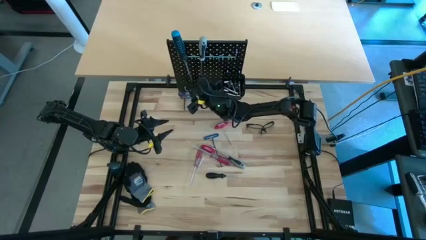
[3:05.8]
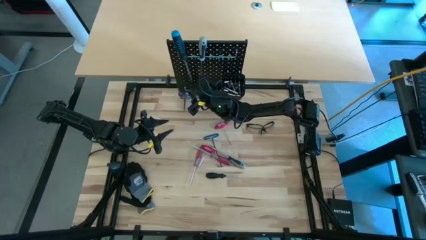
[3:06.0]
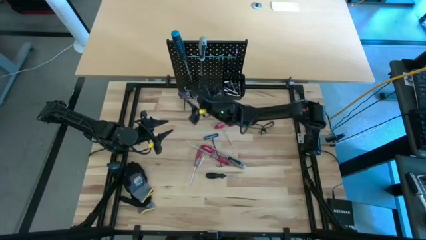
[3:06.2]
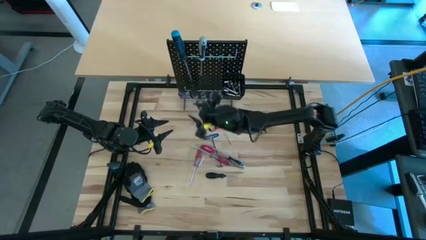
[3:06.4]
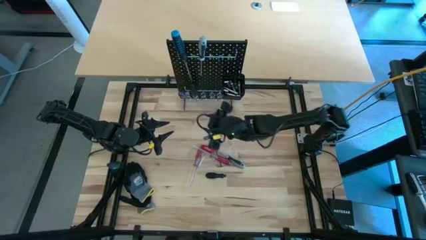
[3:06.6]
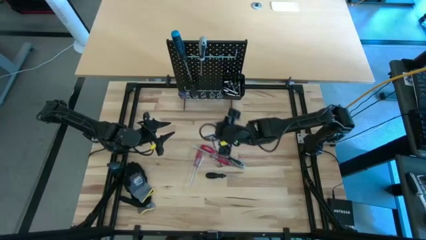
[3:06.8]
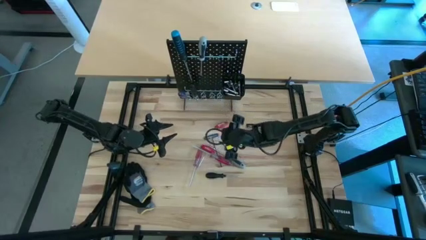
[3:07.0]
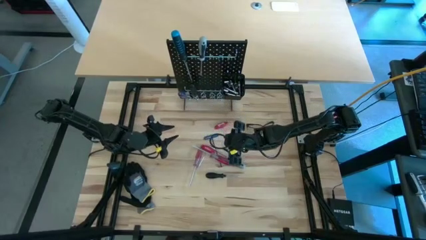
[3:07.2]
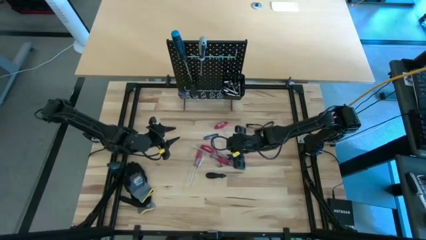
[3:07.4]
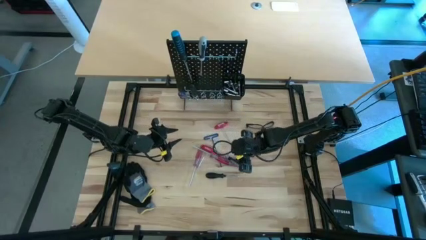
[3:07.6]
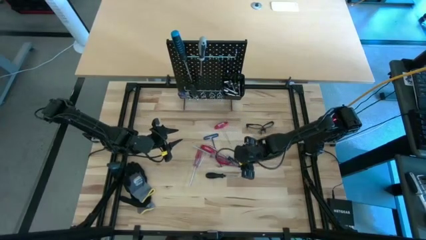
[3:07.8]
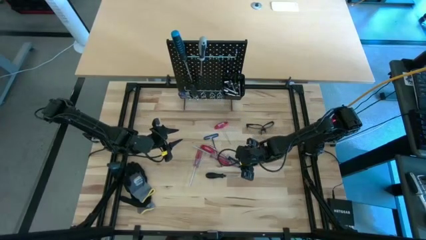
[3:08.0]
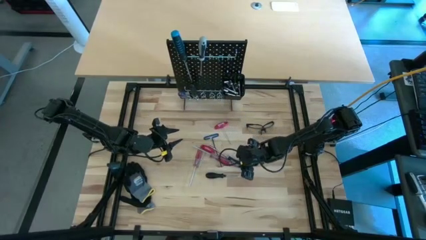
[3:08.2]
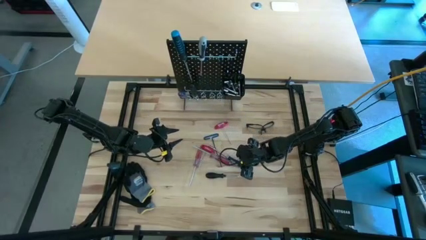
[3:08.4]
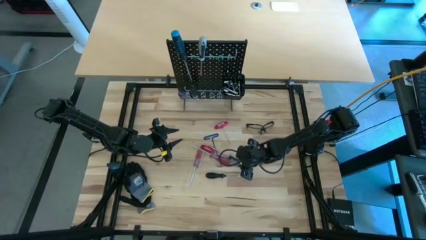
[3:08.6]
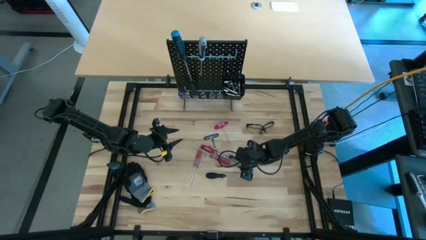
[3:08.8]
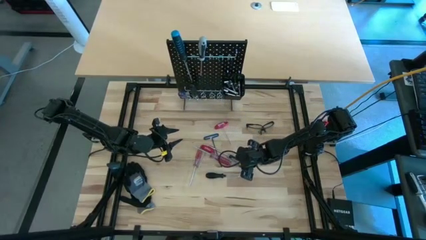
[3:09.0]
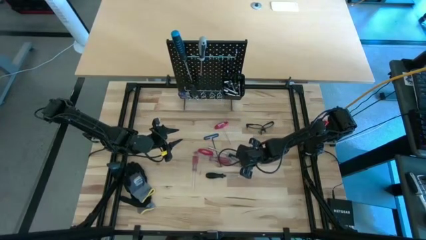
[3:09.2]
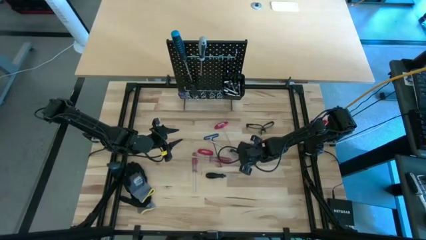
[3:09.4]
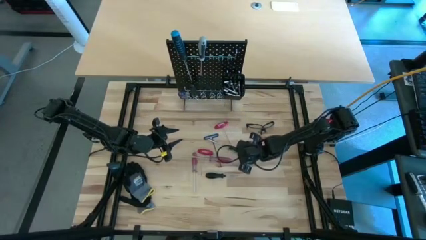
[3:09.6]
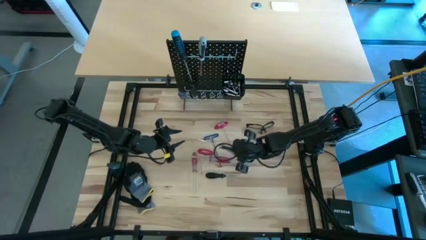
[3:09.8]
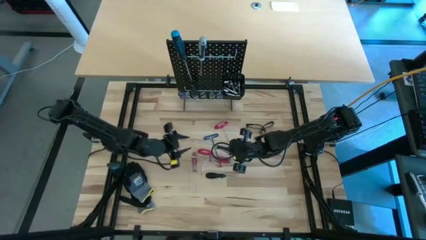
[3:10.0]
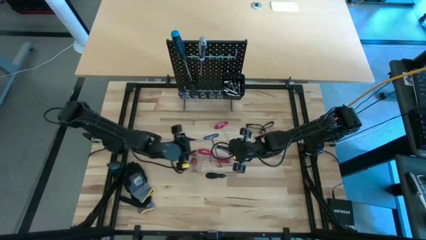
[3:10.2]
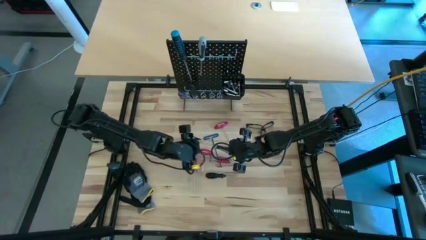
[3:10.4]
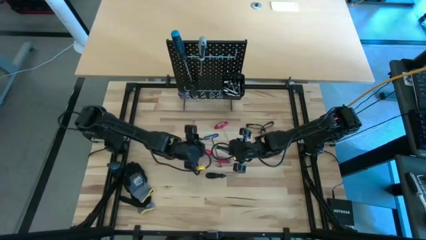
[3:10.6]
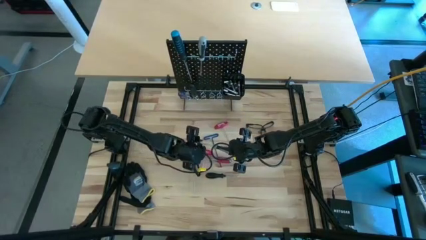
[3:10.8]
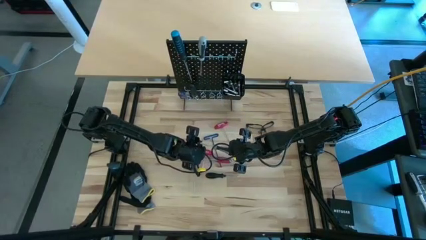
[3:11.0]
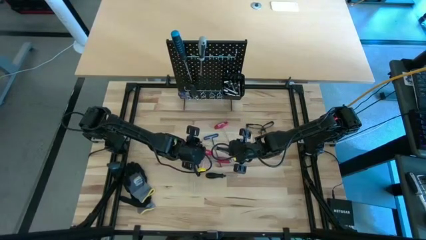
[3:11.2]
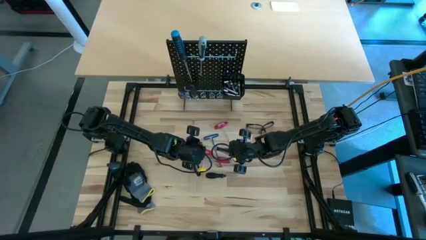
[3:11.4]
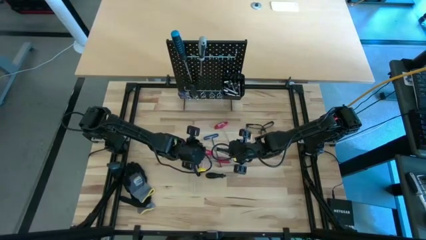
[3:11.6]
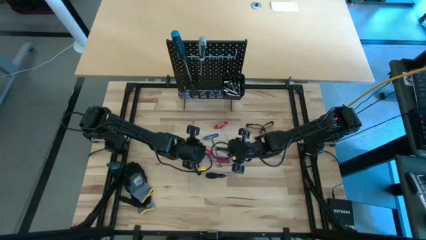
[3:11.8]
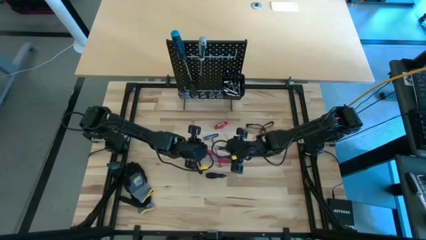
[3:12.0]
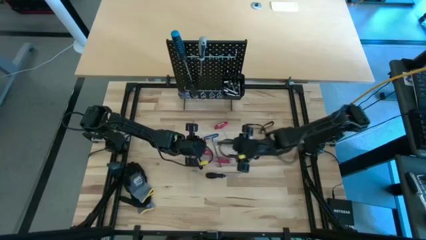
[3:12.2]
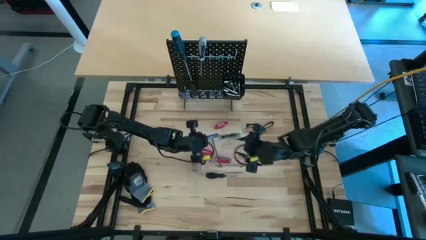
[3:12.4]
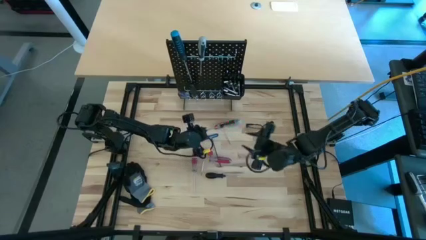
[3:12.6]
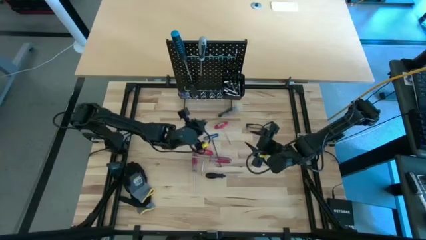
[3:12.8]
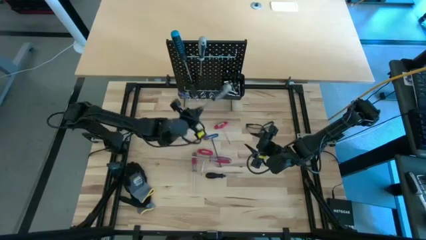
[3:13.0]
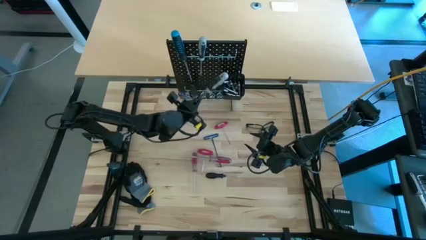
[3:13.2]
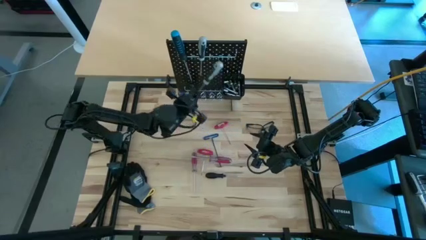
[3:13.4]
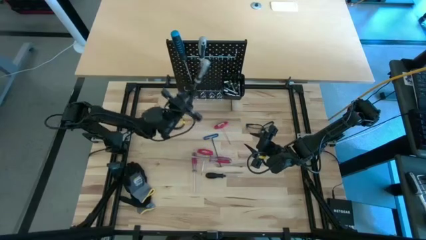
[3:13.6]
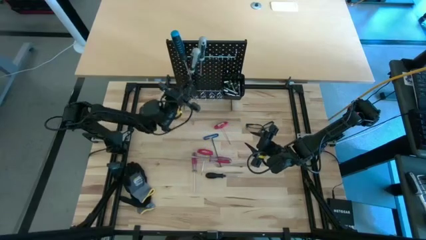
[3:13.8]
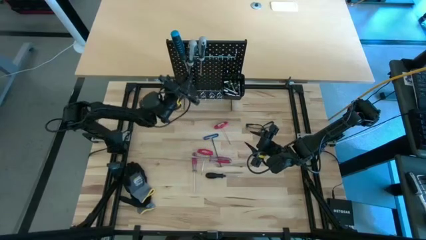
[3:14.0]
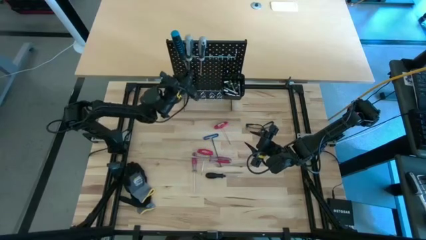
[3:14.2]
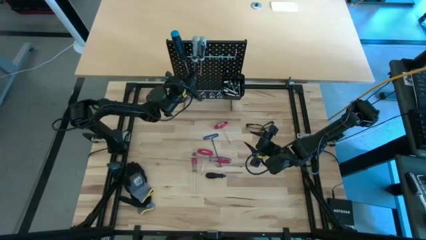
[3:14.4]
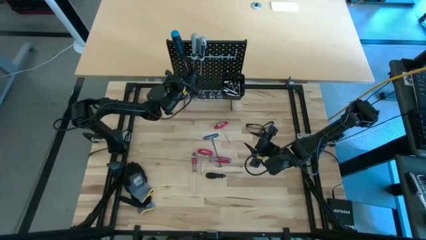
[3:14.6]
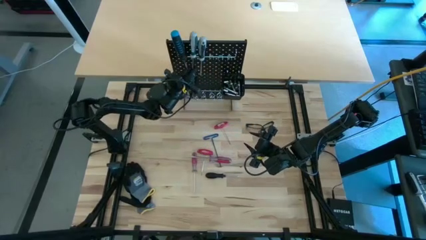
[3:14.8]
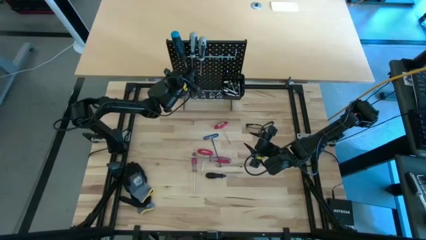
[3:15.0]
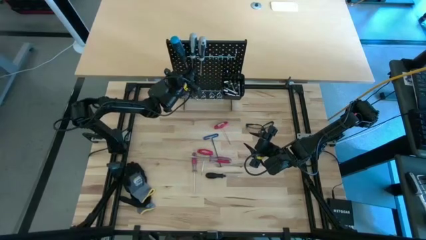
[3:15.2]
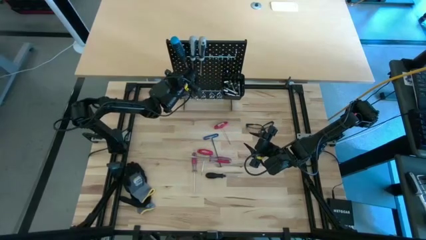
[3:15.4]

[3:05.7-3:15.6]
Task: Hang tools onto peg board
Hang the gray screwdriver on the peg board

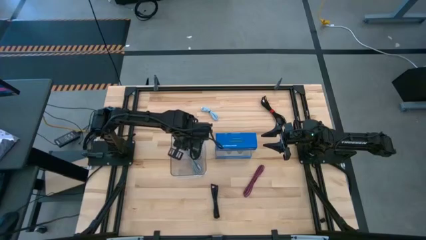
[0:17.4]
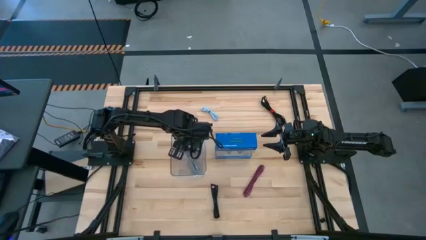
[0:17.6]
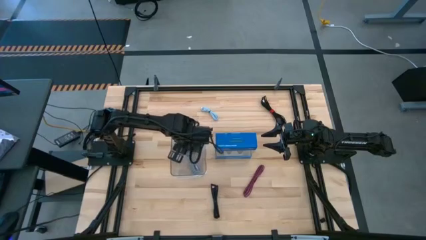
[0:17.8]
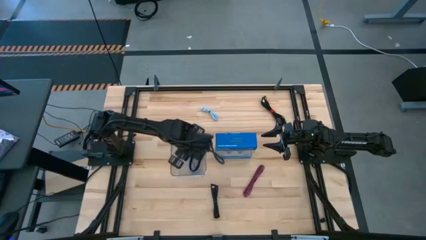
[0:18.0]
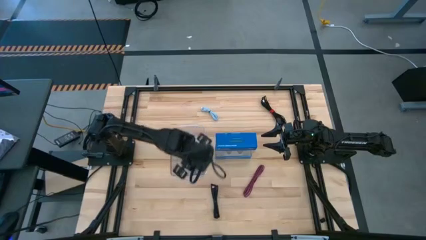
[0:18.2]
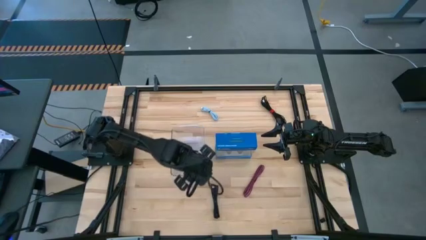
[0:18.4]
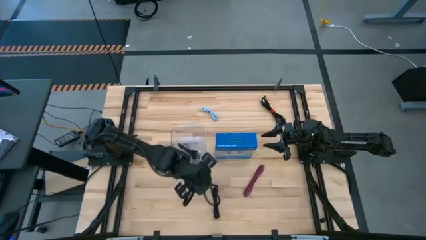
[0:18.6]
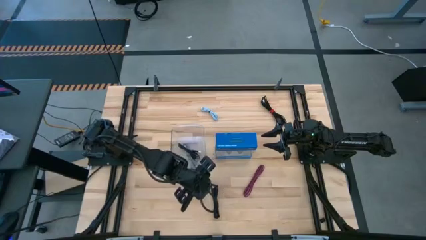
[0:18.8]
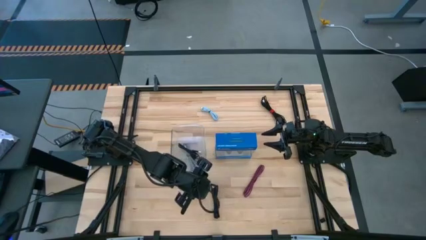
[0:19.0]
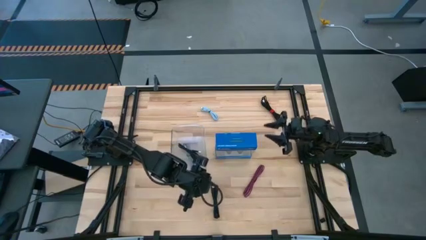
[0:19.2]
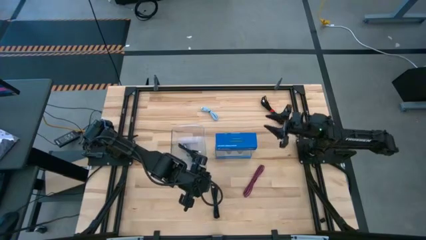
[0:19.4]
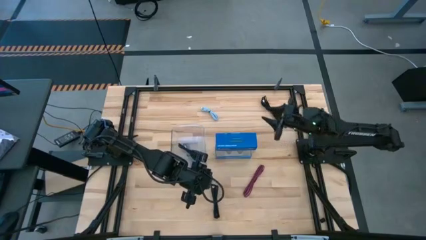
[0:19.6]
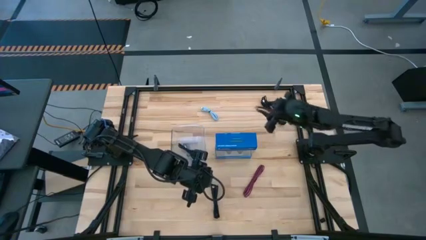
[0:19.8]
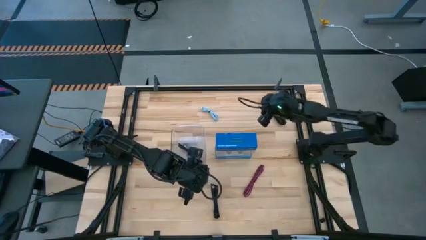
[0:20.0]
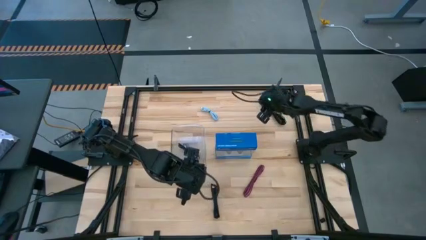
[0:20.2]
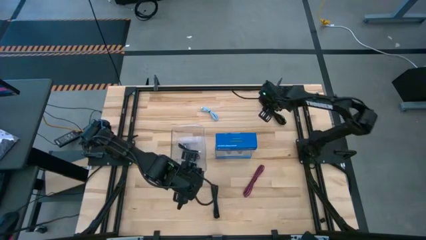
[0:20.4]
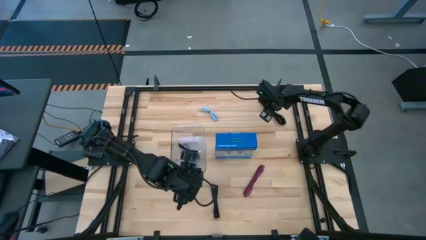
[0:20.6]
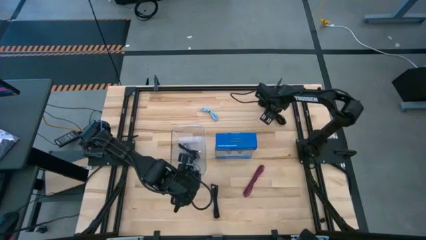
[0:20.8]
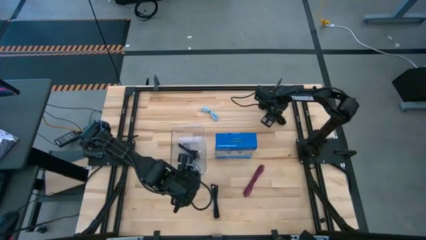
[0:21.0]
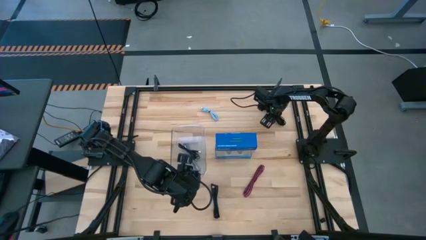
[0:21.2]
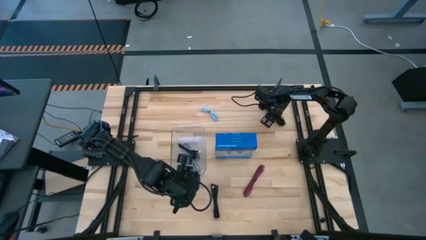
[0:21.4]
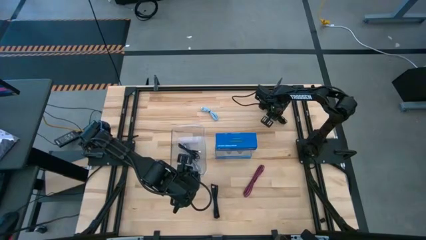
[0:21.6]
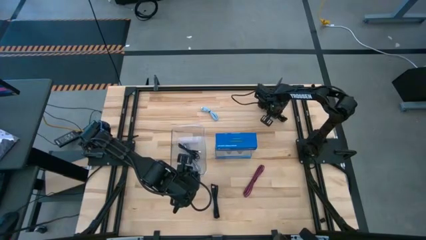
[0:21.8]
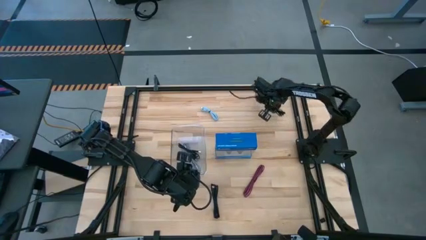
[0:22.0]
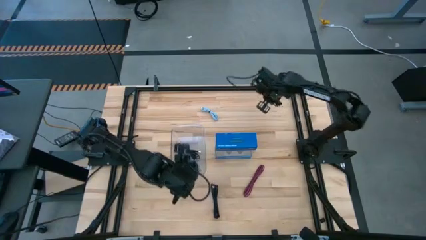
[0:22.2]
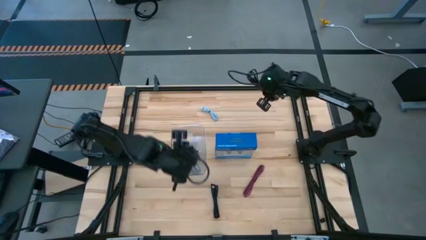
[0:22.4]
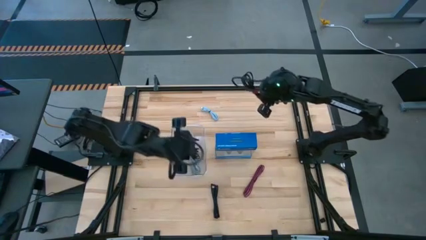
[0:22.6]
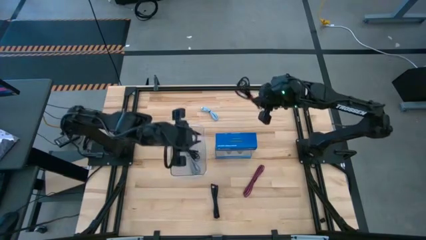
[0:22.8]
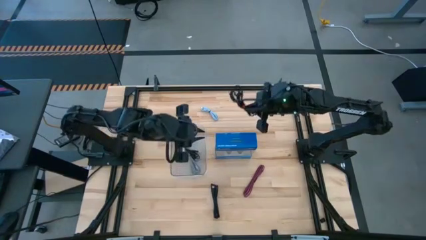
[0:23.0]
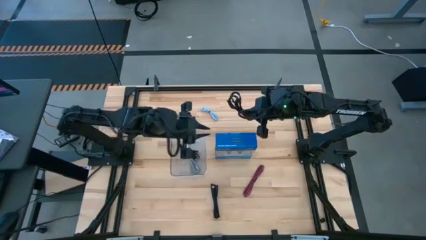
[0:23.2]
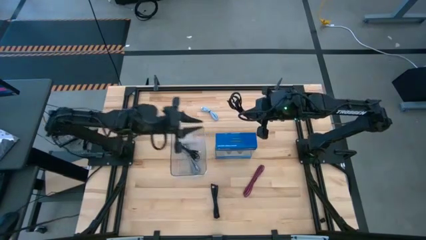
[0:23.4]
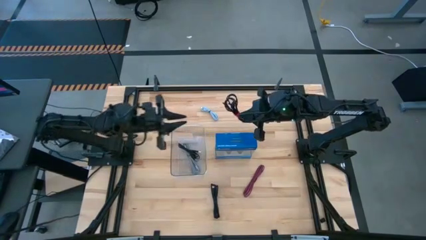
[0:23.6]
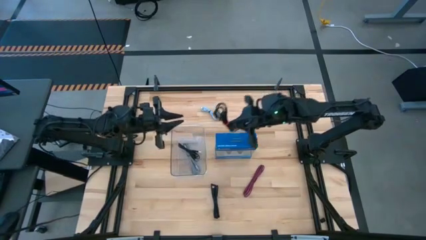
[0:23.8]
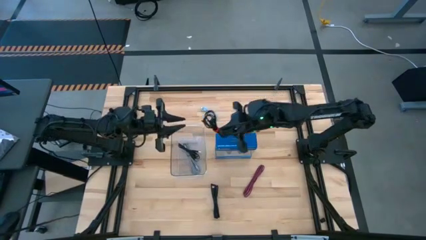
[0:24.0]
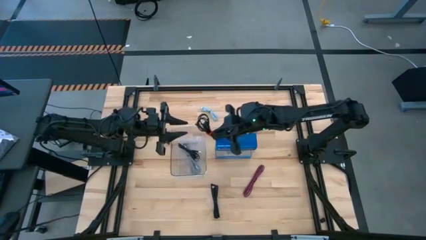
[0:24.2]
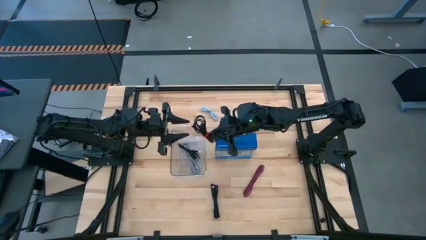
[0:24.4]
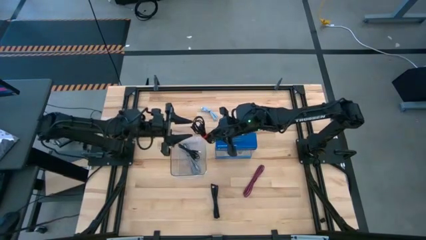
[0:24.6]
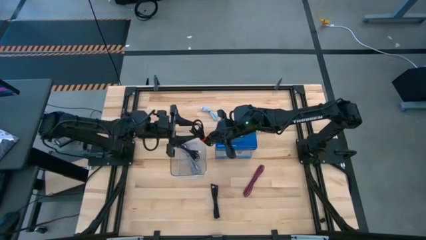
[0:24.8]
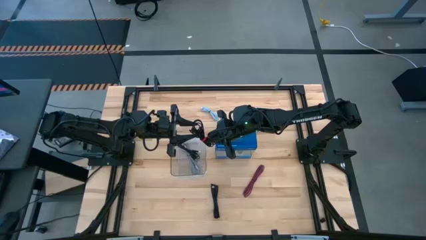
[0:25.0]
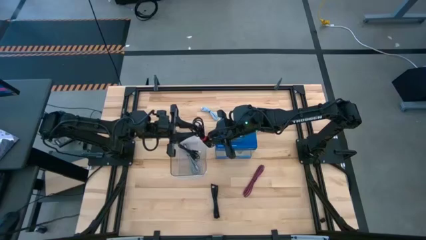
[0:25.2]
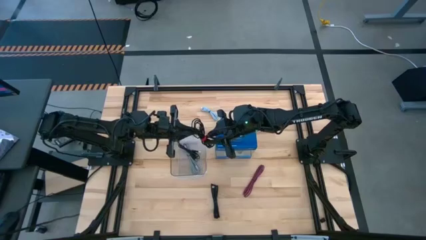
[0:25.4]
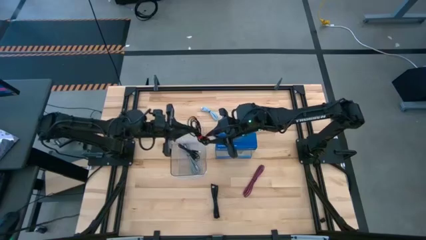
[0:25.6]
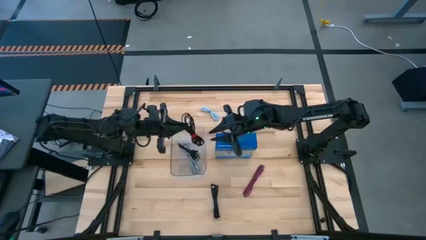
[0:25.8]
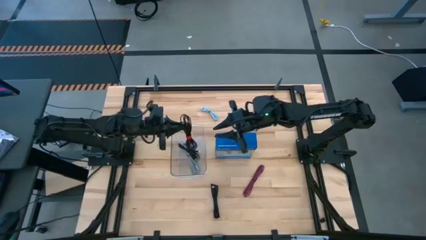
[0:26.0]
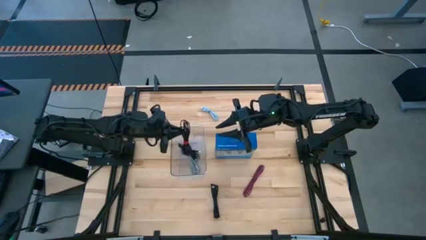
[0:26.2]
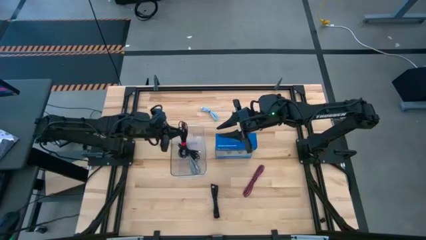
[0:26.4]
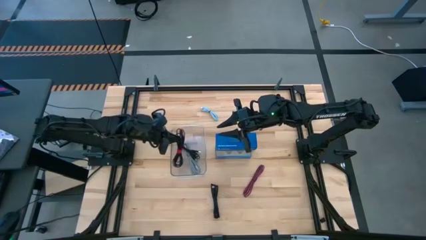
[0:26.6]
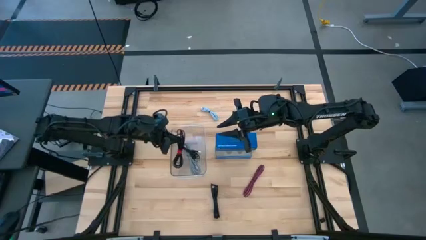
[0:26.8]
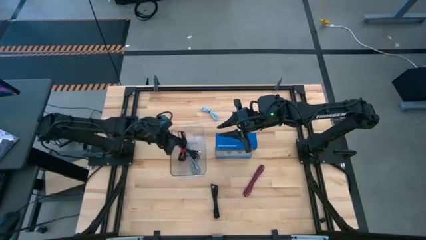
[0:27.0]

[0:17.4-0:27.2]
Task: Pick and place USB-C Cables
Put the top black charger cable into the transparent bin
